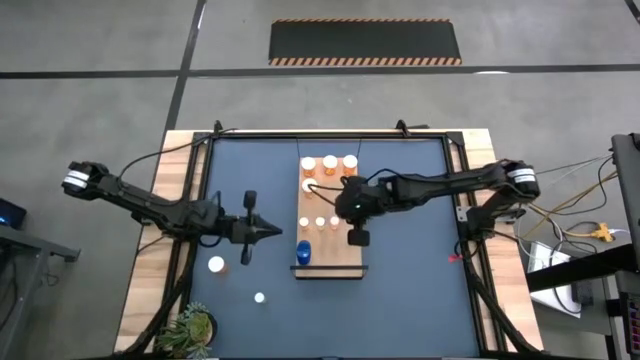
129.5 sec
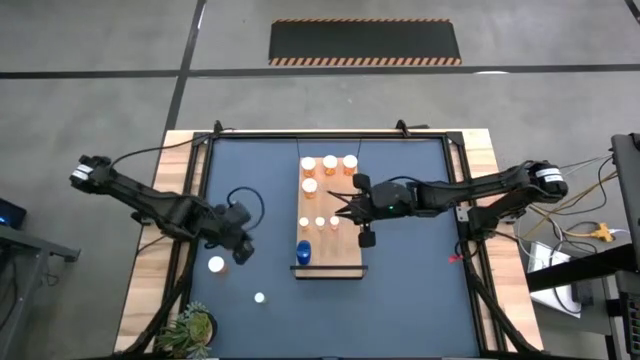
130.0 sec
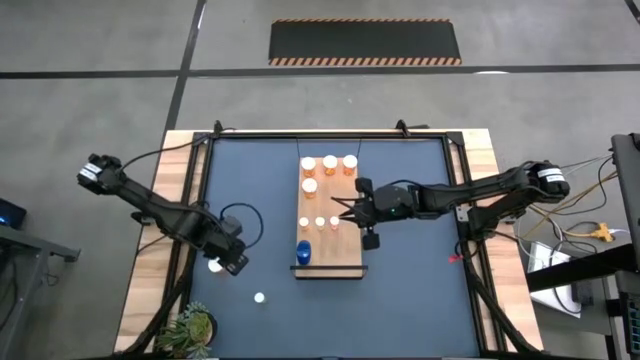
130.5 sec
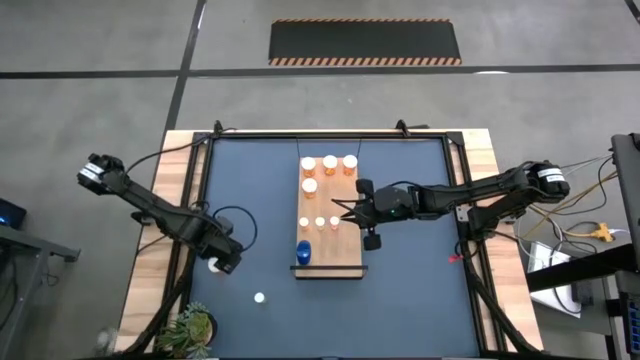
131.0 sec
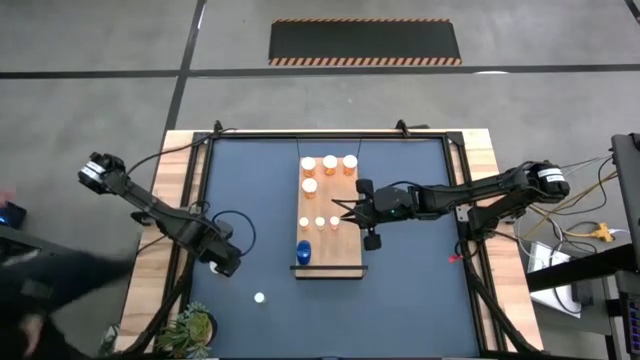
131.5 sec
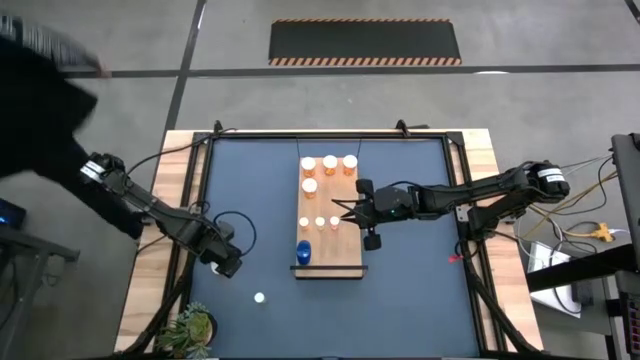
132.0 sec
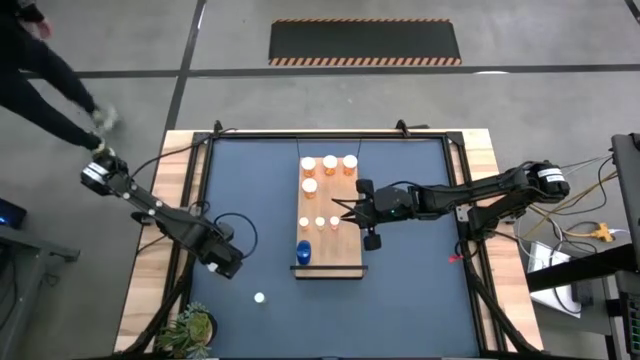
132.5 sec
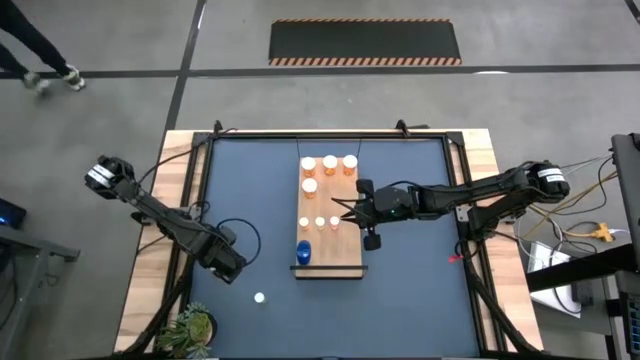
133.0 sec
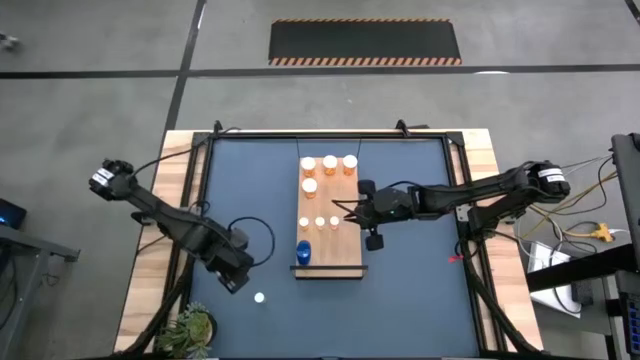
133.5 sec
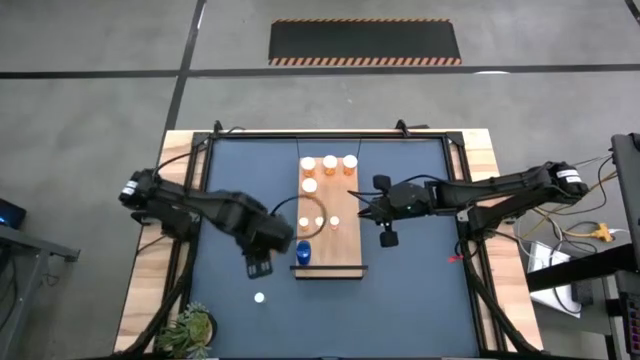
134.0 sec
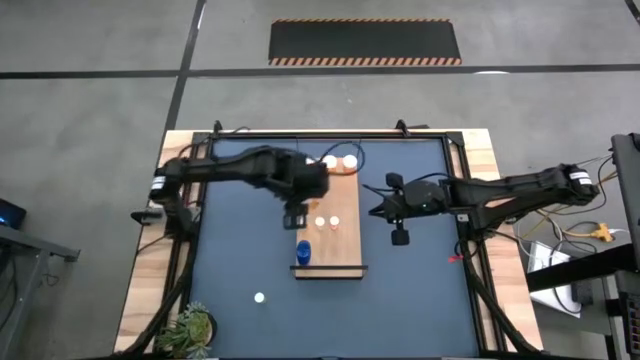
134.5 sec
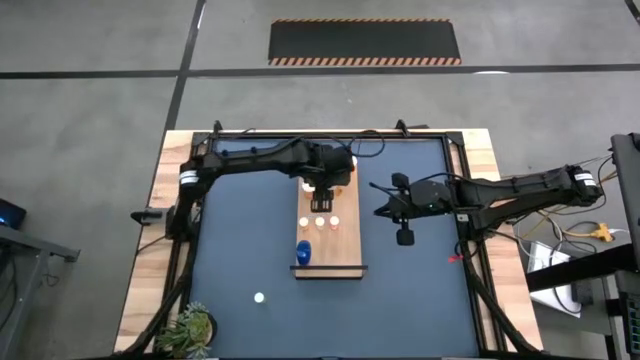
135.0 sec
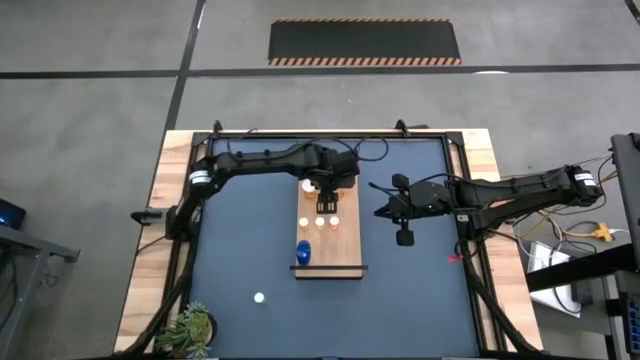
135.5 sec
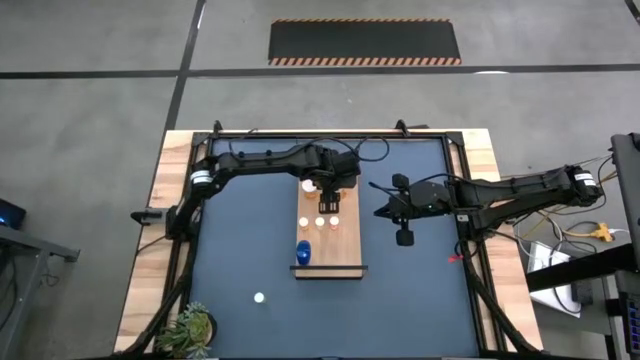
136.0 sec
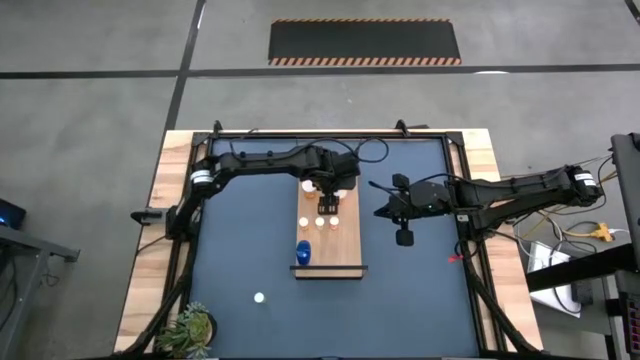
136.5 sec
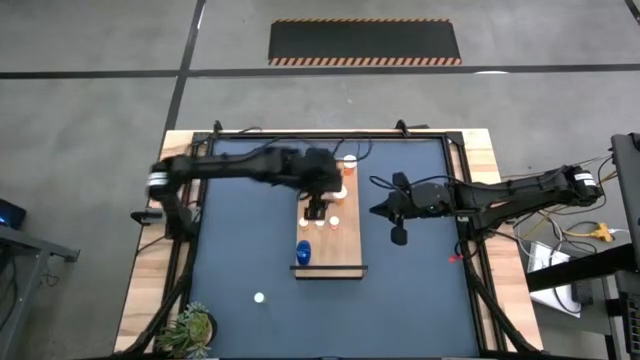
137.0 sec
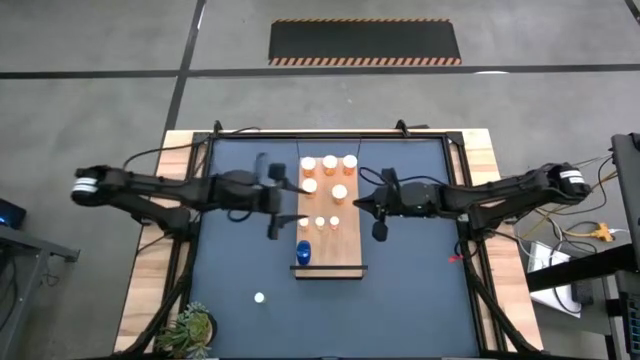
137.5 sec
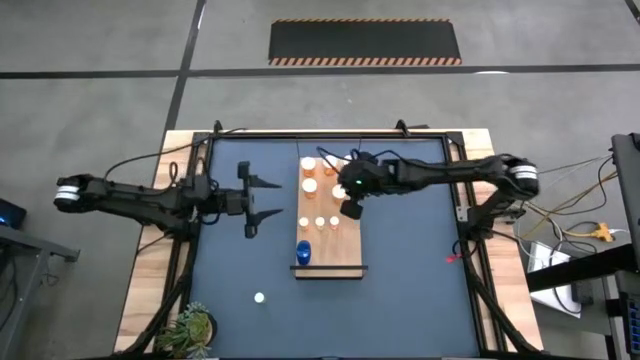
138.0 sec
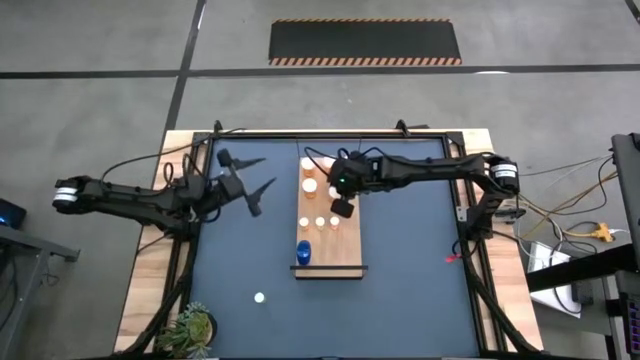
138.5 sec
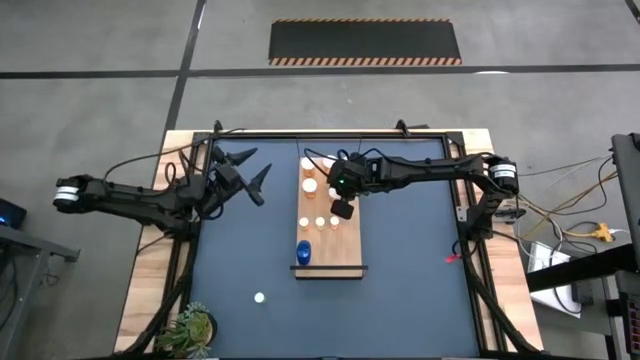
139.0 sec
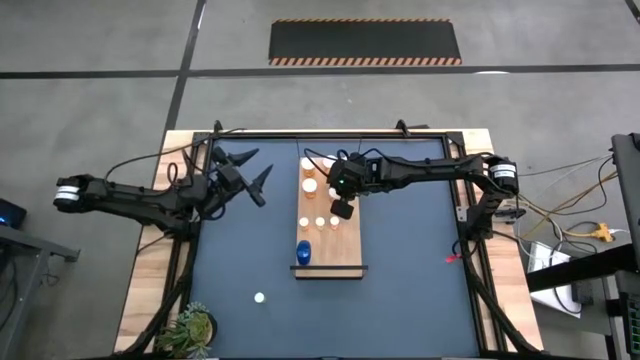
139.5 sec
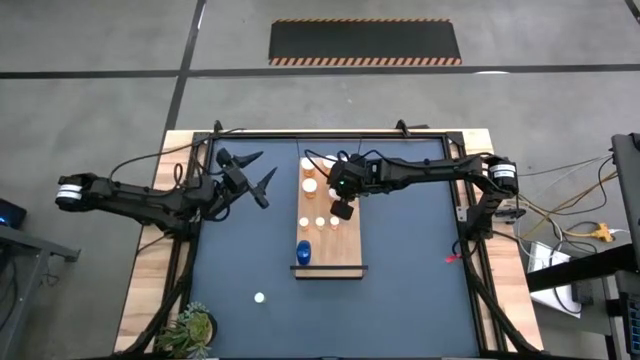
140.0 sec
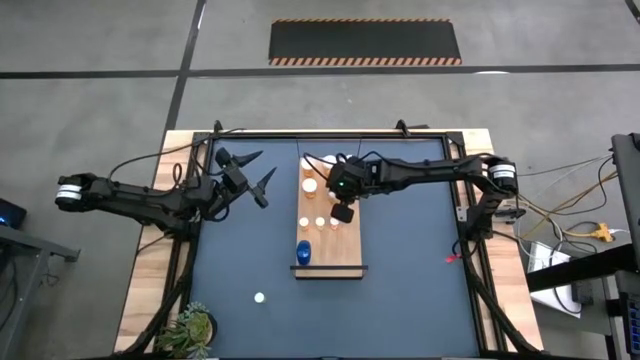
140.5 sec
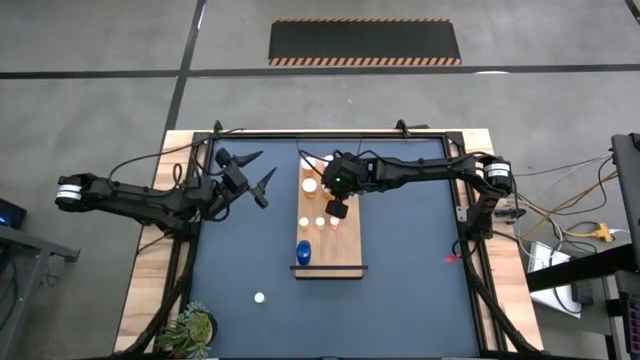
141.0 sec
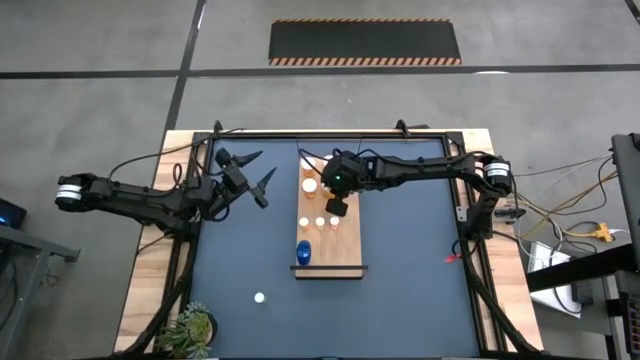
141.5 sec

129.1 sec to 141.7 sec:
Task: Pick and place medicine bottles onto shelf by color
Put the big orange pill bottle on the shelf aligned with the big orange pill bottles

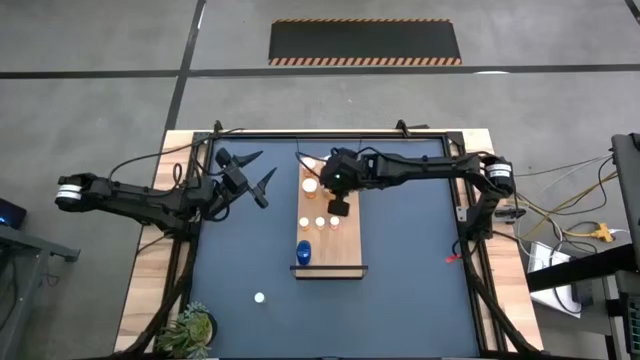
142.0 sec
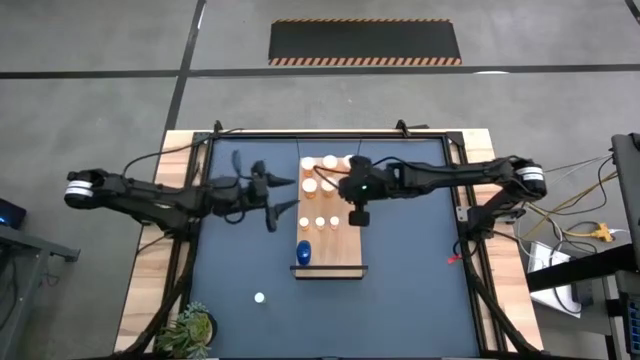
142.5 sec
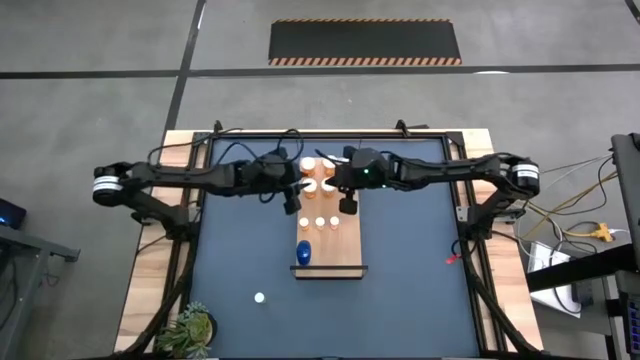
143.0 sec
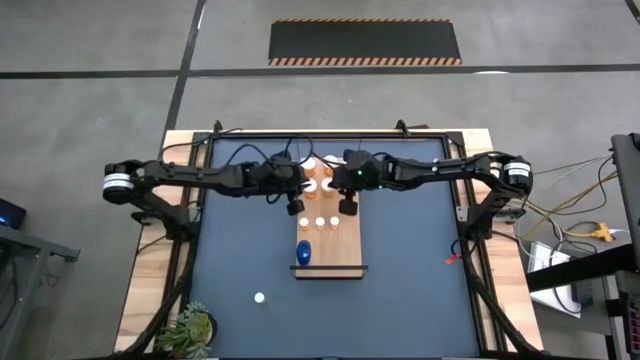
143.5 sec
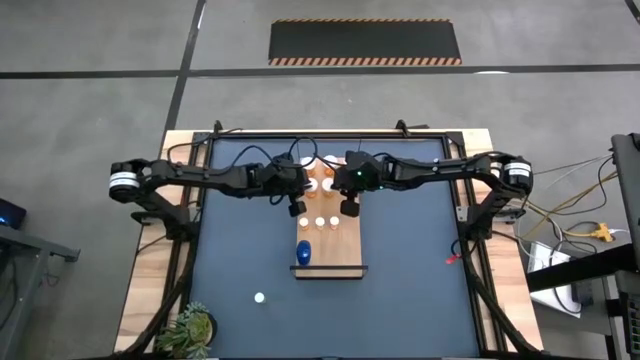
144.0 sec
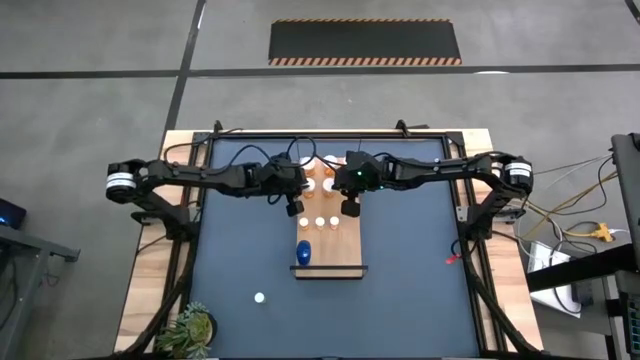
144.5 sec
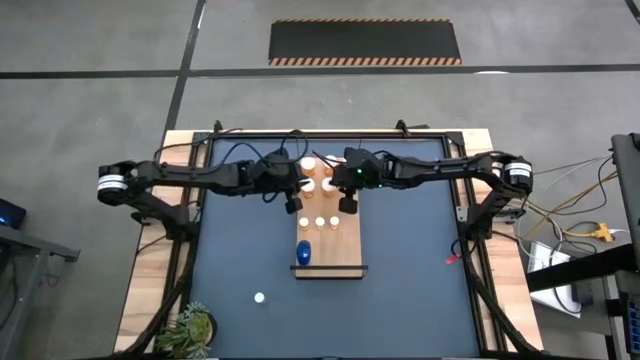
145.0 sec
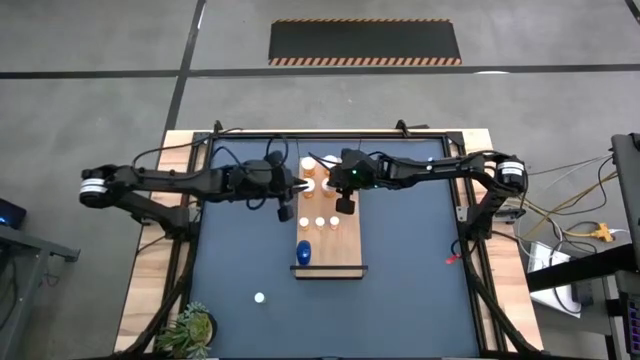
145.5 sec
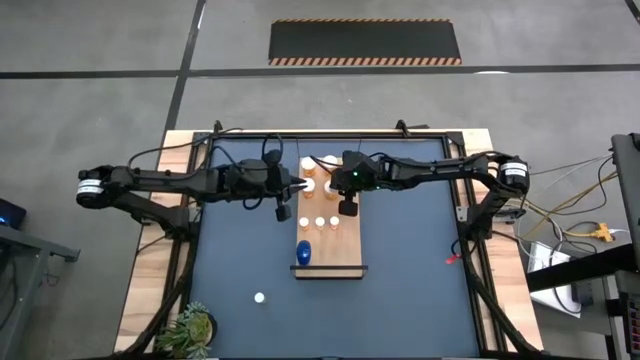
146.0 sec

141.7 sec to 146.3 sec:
Adjust the big orange pill bottles on the shelf

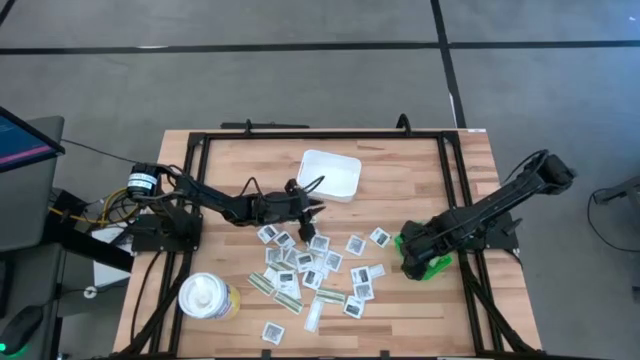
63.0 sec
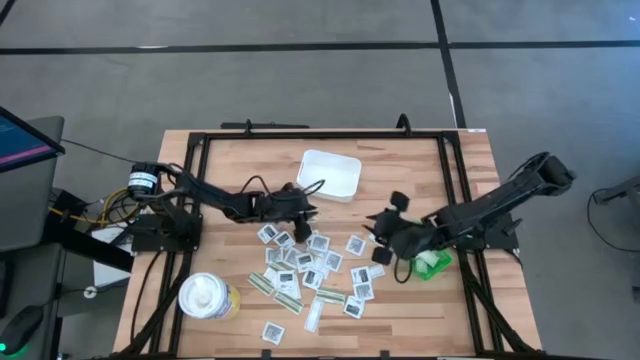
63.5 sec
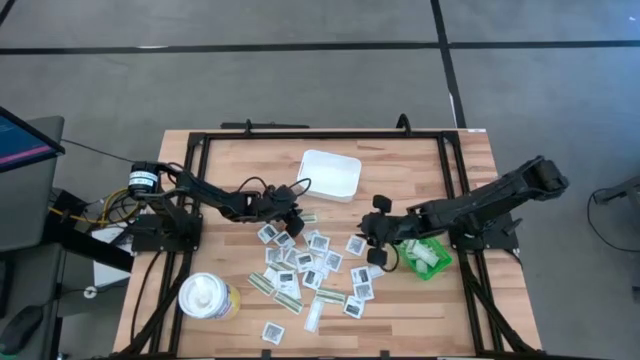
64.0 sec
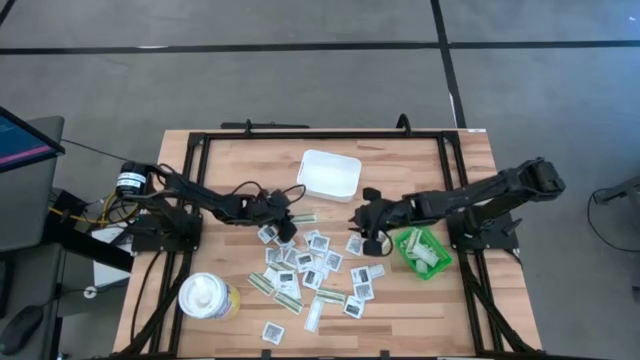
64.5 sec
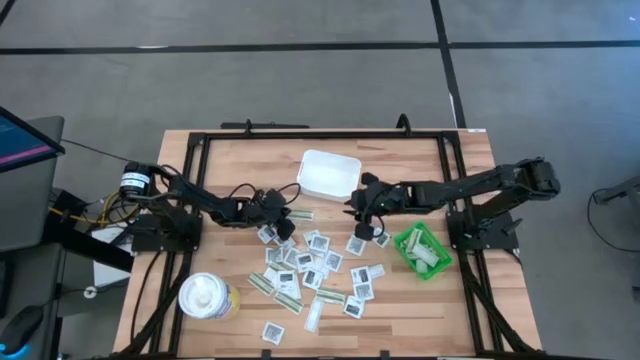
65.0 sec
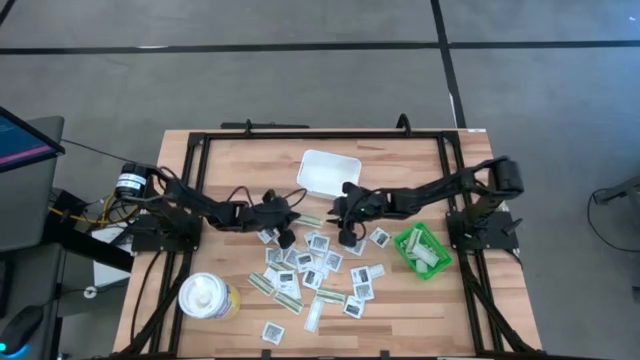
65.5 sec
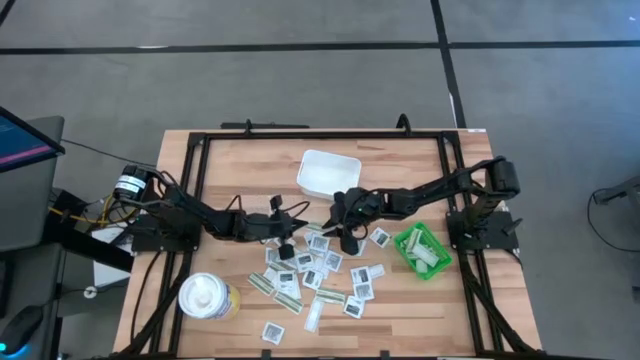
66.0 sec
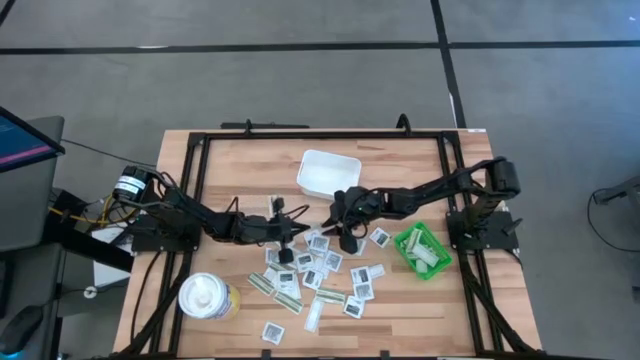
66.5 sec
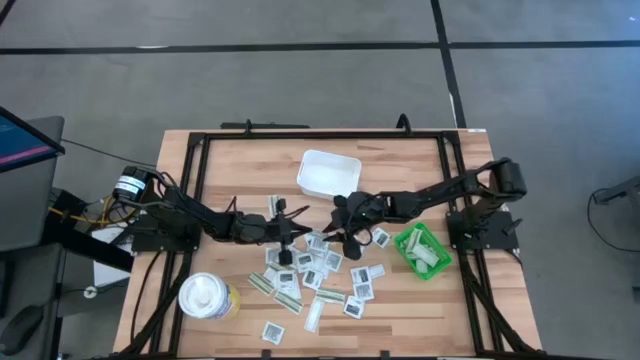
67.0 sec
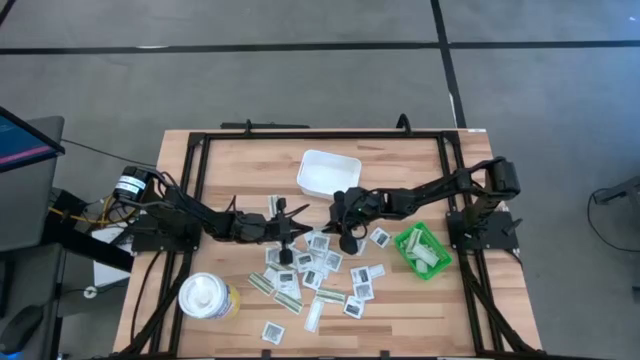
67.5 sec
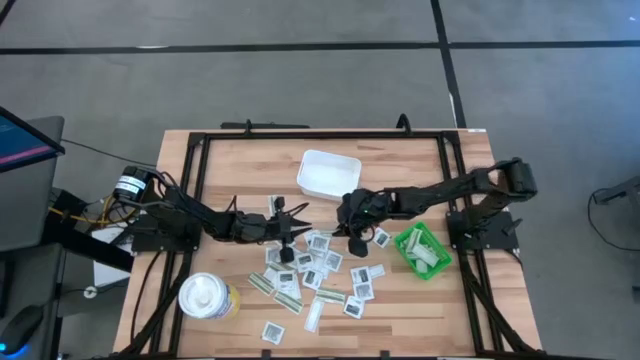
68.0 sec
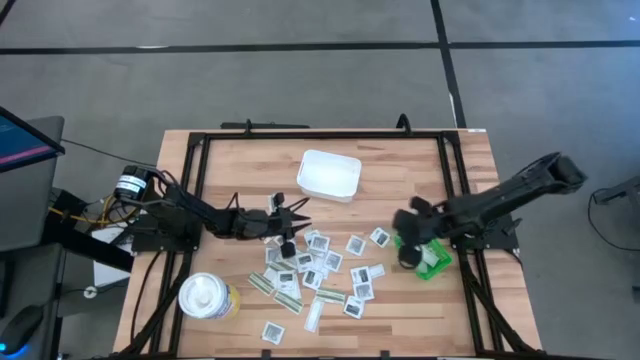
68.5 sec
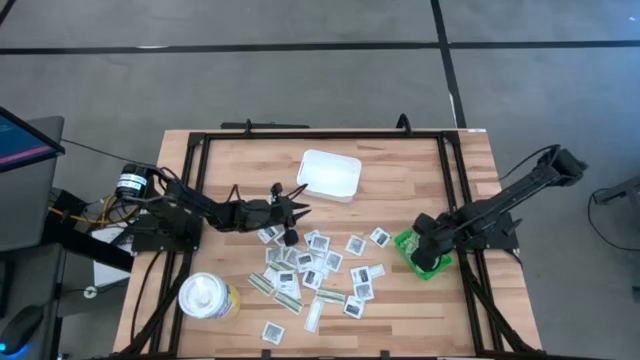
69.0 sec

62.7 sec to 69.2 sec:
Task: Pick & Place First Aid Supplies
Put the bandage pack into the green bin
